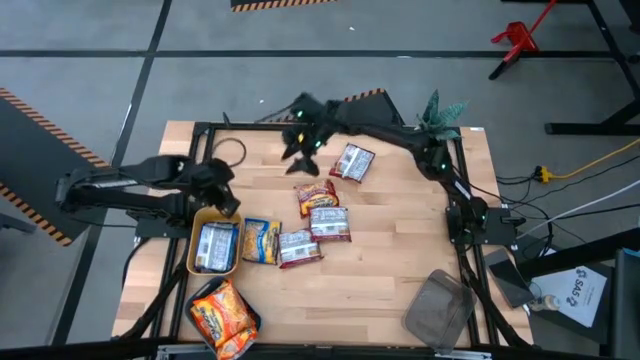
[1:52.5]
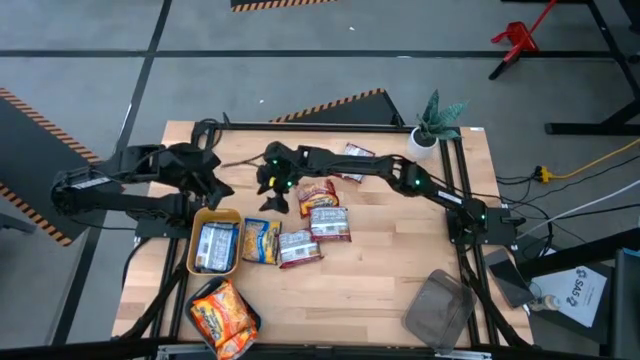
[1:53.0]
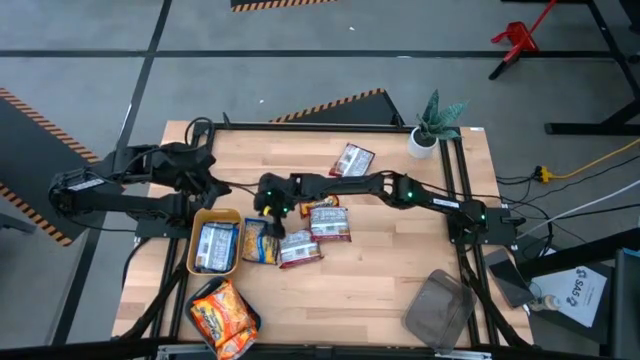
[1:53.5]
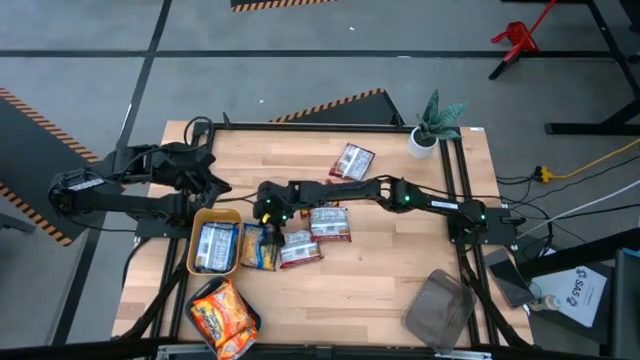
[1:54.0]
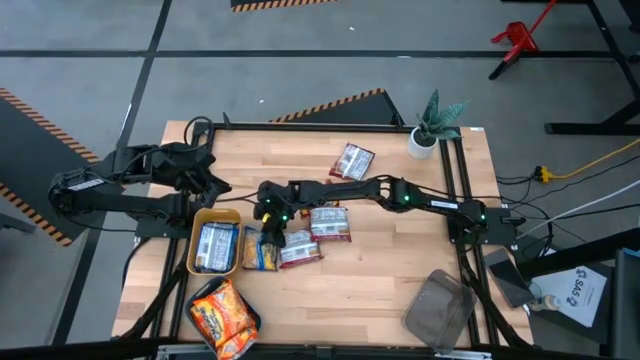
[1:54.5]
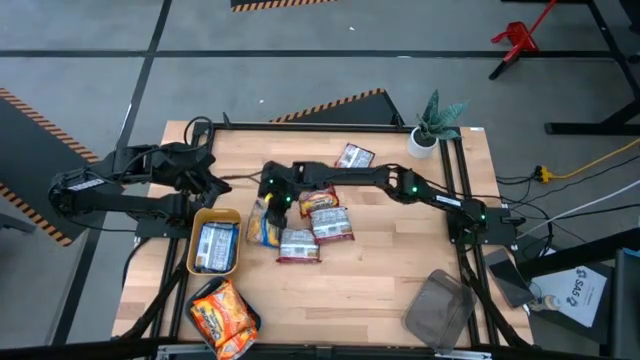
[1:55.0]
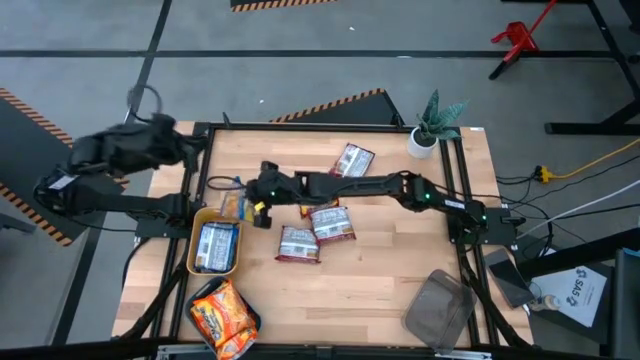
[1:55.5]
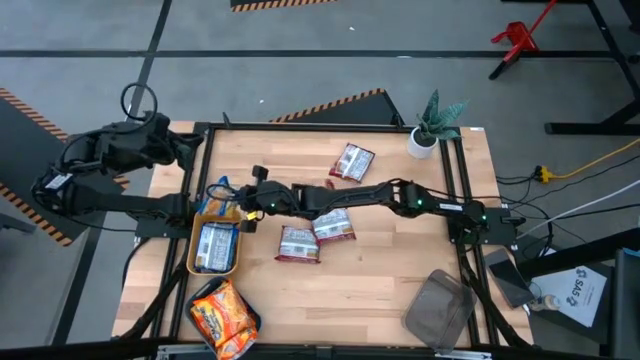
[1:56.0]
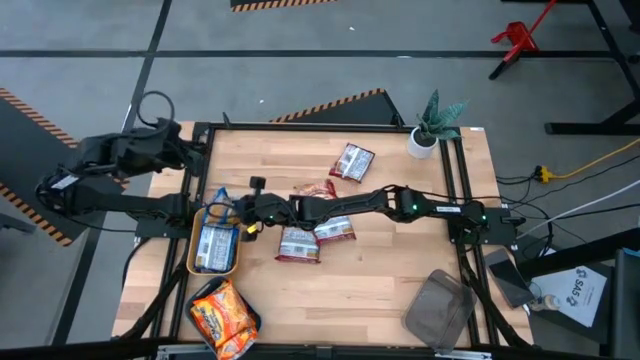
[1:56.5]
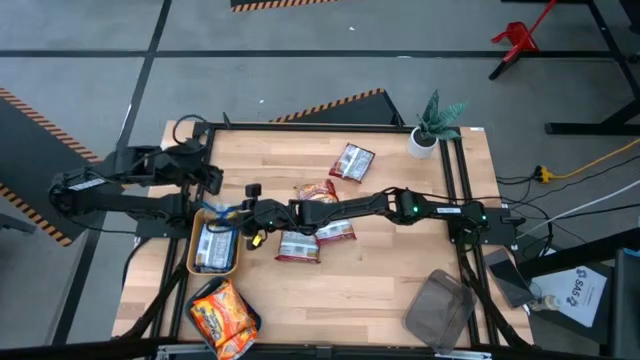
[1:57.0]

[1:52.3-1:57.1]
Task: Sort Maruchan noodles
Put the blue noodle pack into the yellow bin

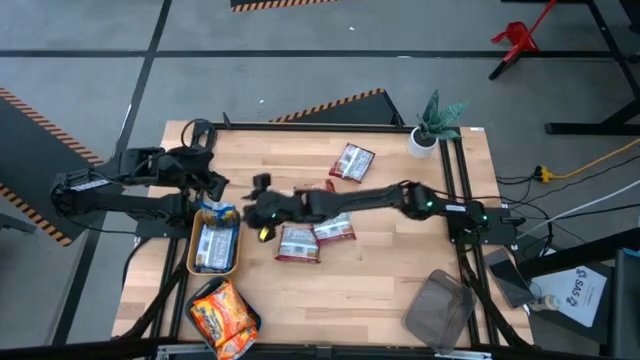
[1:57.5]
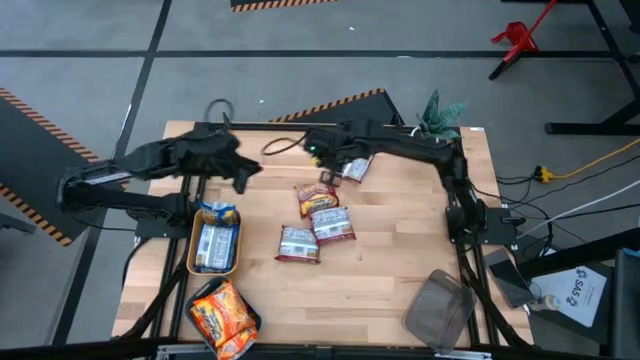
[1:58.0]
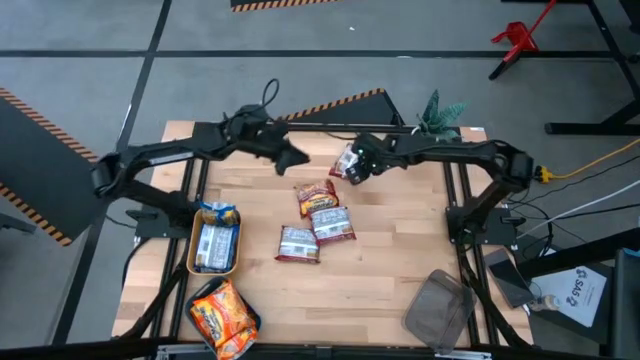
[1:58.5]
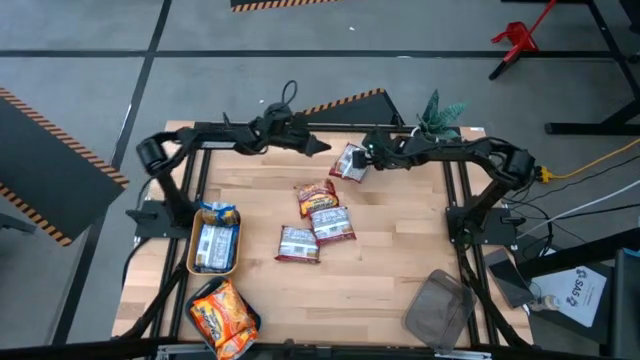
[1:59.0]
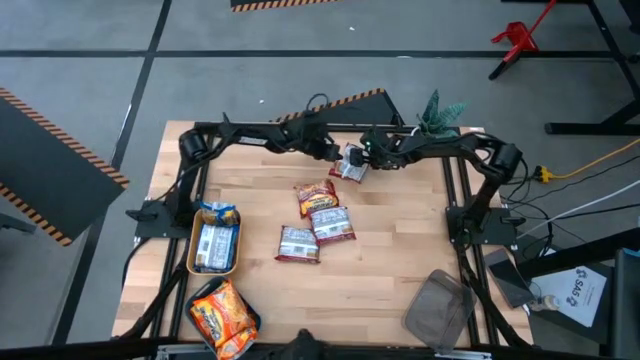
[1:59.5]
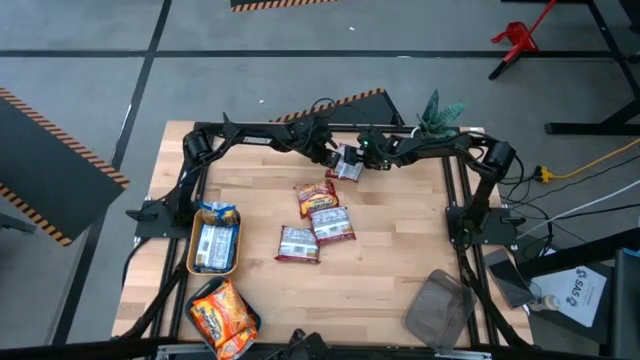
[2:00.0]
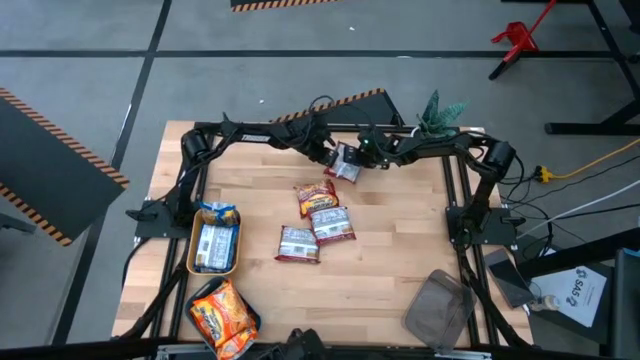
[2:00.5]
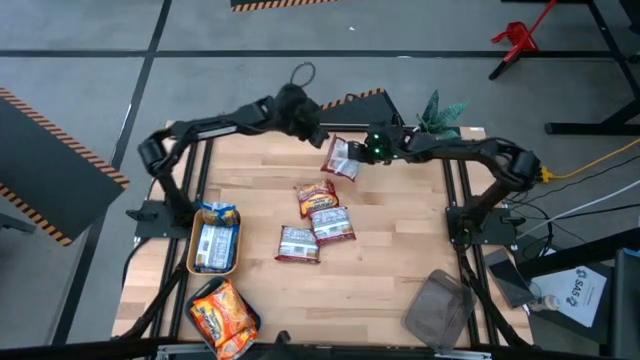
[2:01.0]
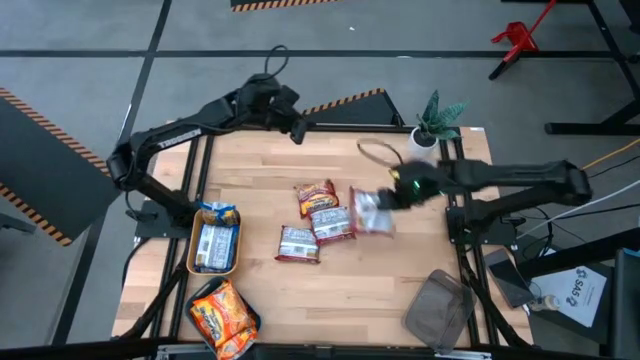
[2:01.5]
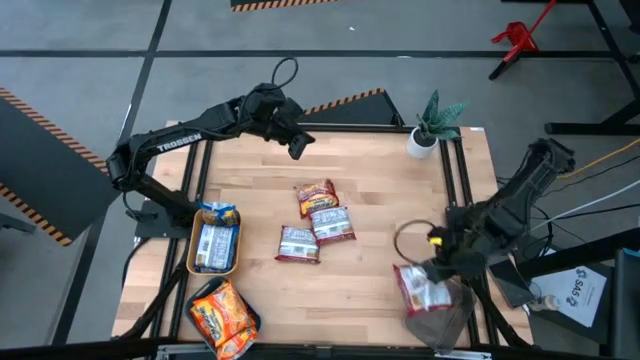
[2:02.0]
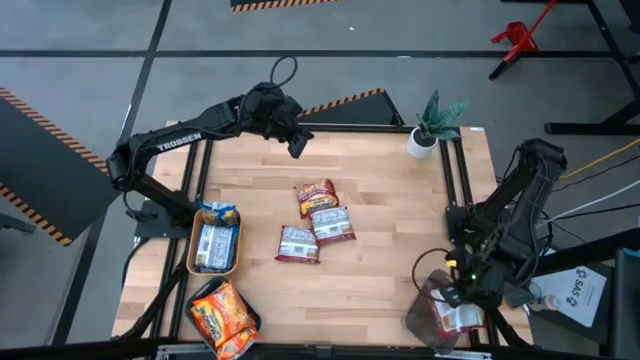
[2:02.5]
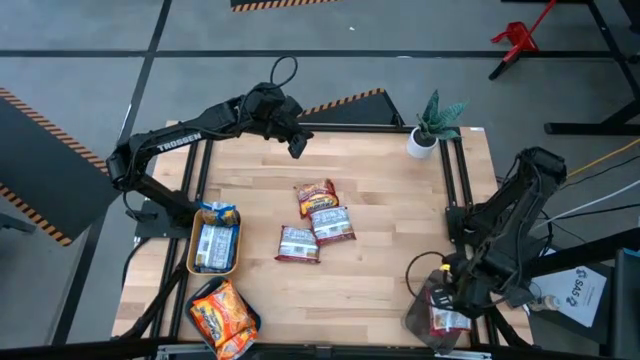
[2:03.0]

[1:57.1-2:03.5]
Put the red noodle pack into the black bin

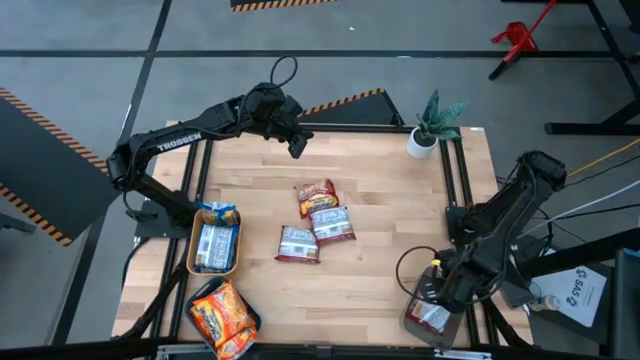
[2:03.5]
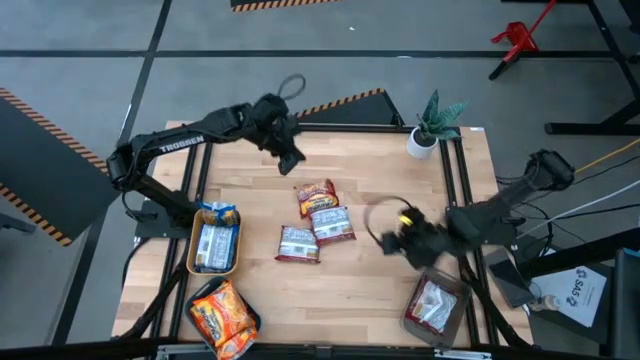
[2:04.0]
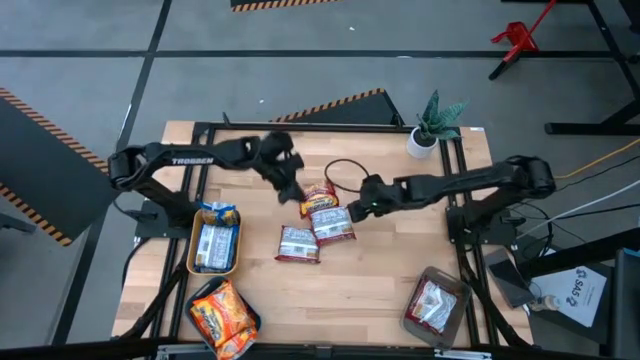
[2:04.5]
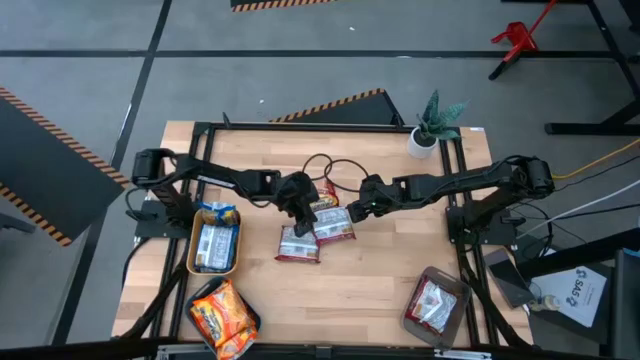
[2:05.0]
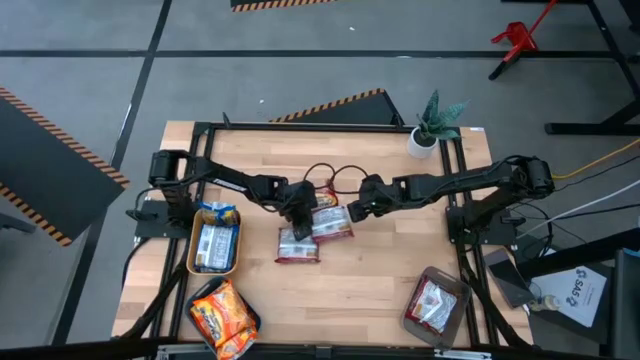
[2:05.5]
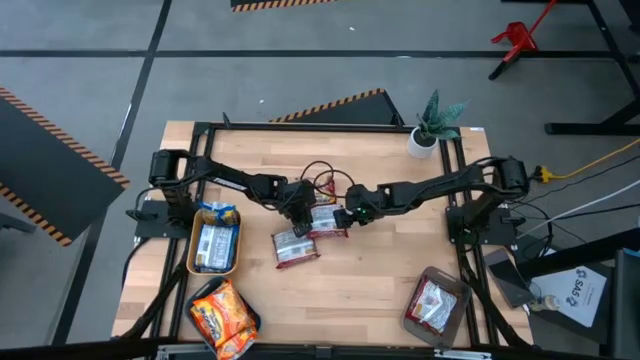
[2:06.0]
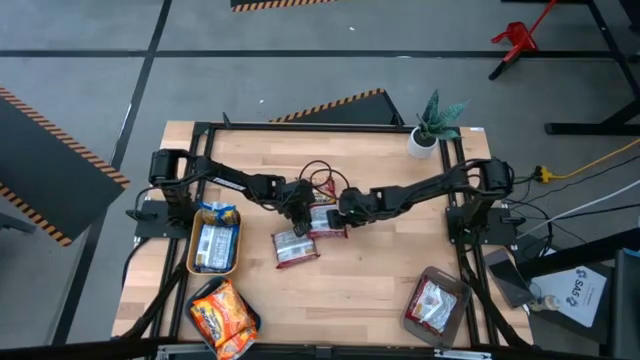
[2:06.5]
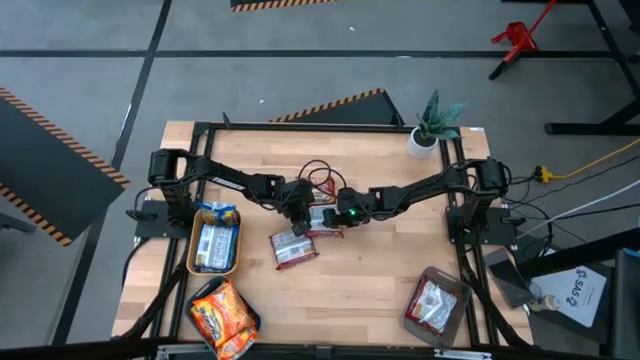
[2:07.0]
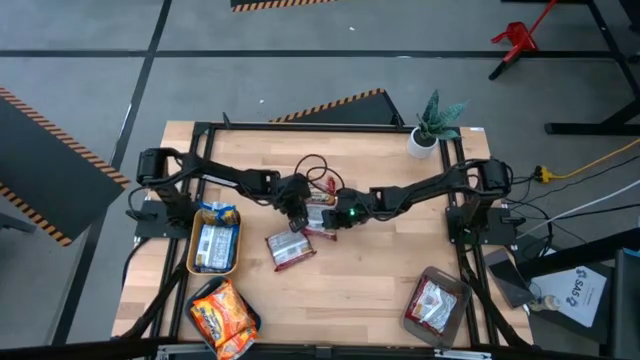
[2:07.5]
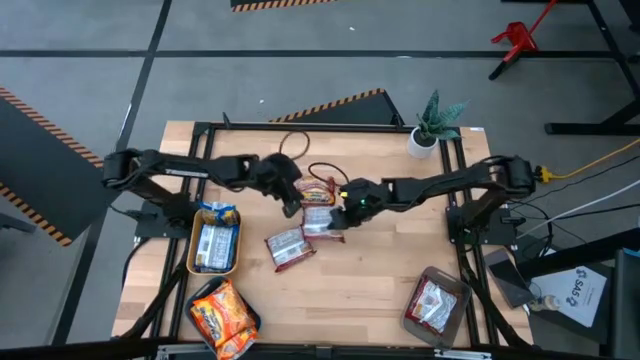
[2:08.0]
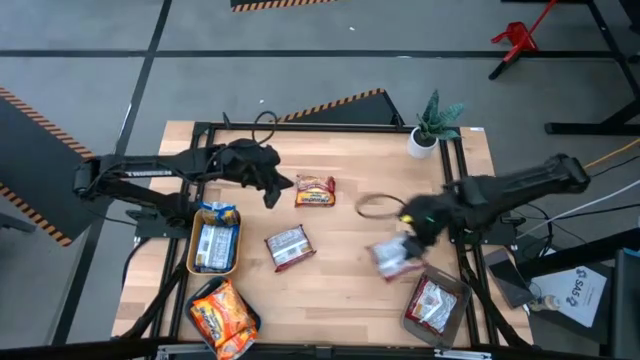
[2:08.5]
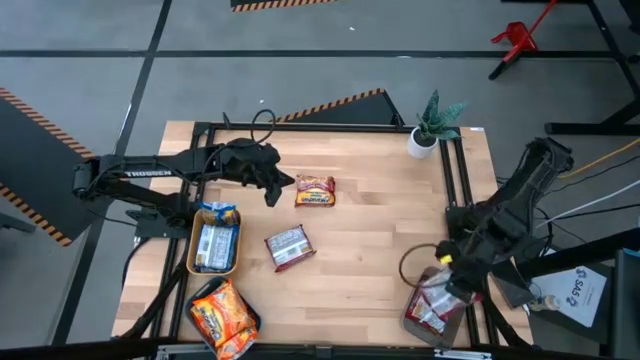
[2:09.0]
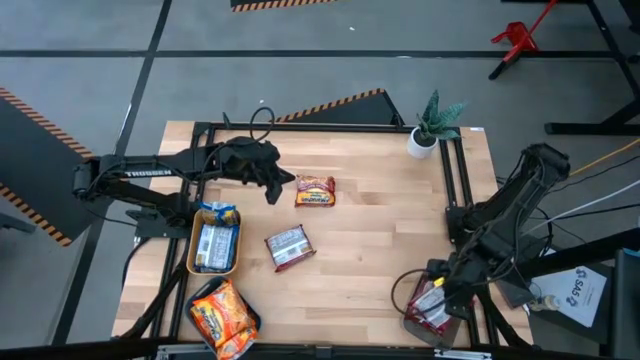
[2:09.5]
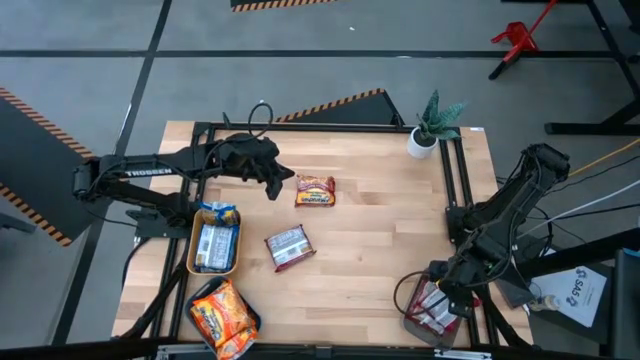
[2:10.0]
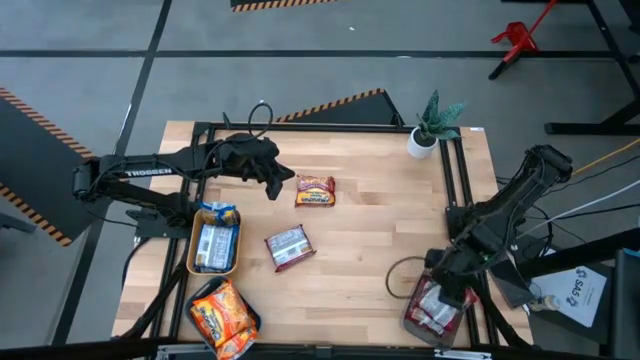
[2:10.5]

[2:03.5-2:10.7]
Put the red noodle pack into the black bin

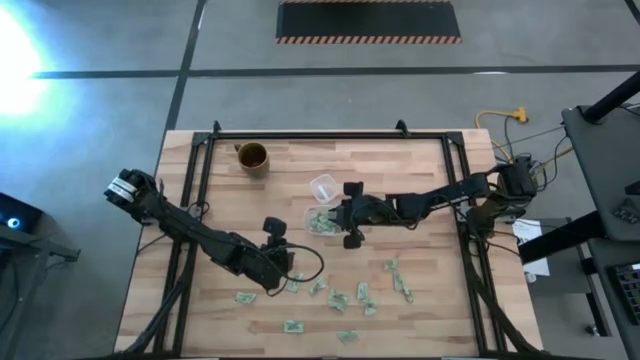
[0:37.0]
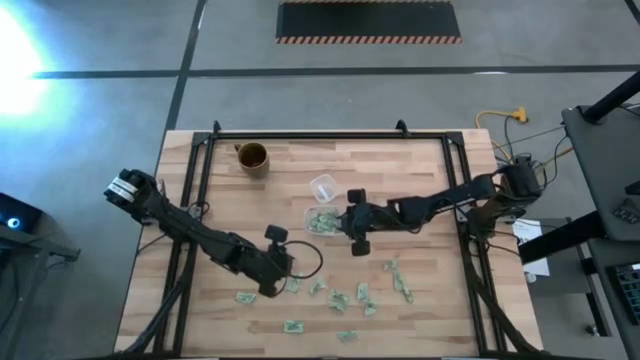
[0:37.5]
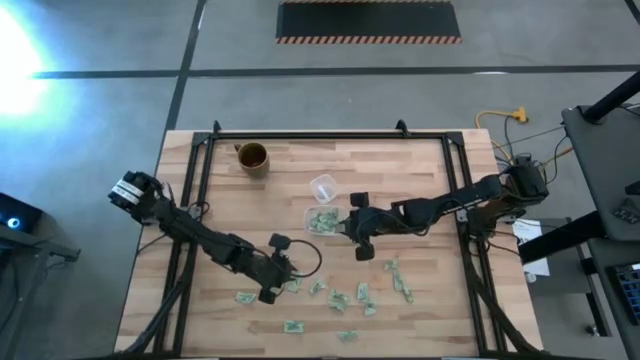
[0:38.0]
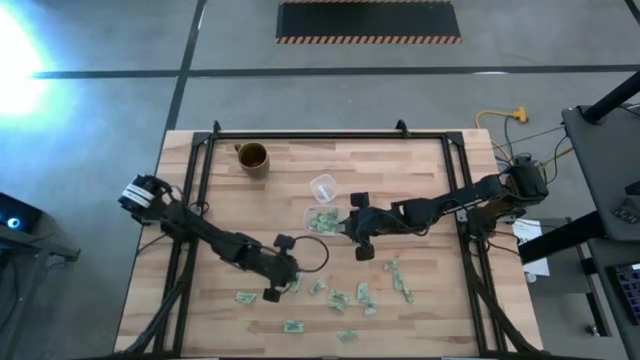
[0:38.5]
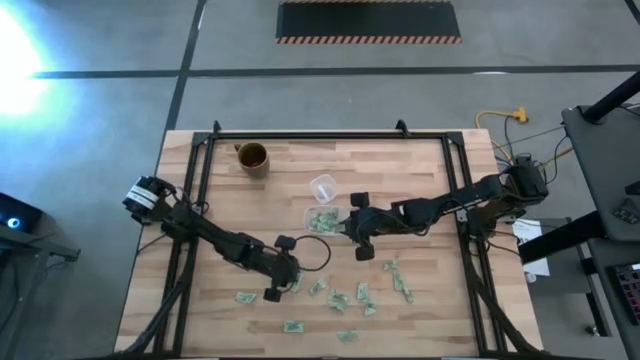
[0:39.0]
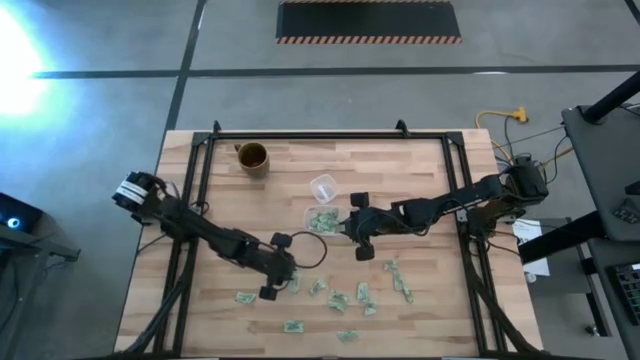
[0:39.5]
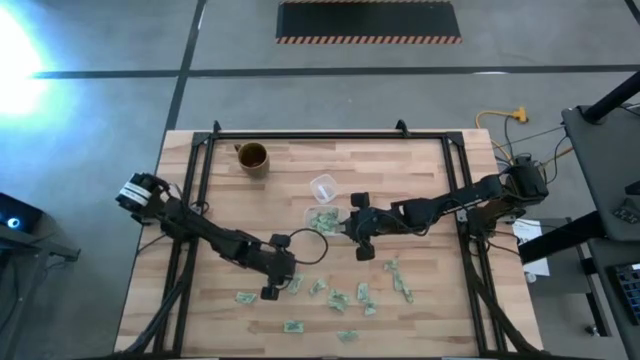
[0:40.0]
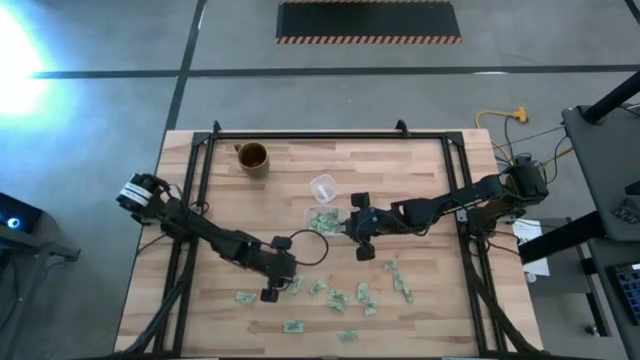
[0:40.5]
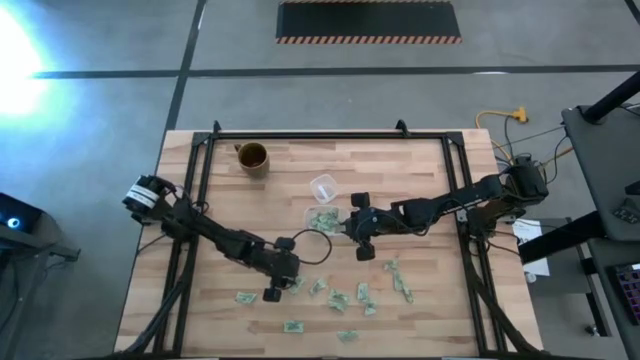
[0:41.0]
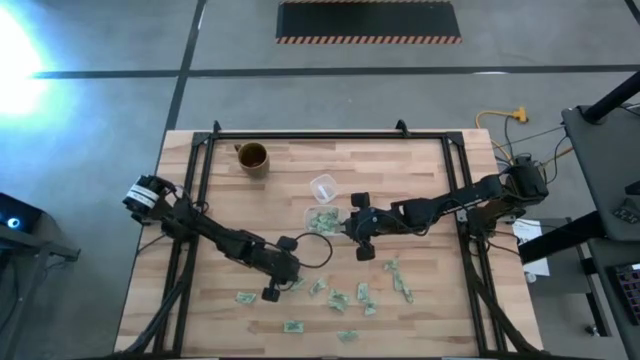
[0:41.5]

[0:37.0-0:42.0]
Task: Pick and place Stevia / Truvia into bins
Put the stevia packet into the bottom transparent container
